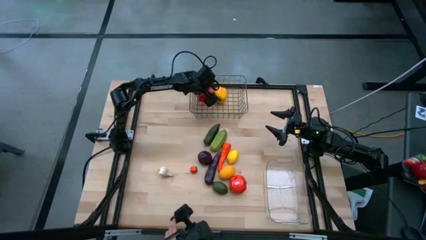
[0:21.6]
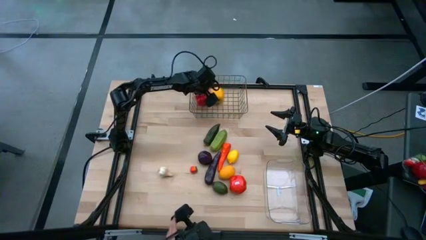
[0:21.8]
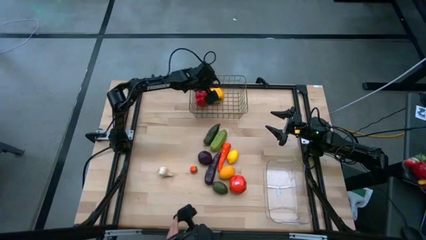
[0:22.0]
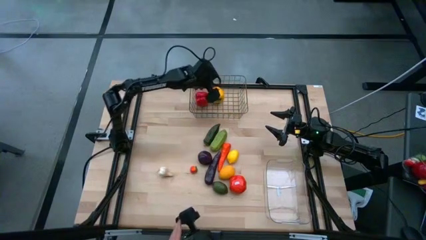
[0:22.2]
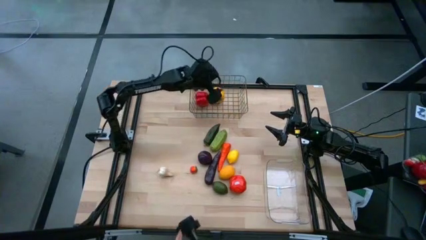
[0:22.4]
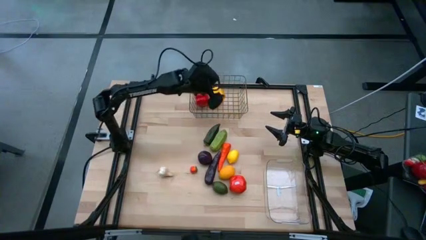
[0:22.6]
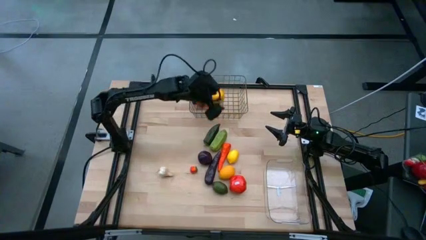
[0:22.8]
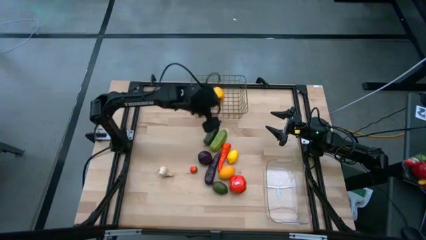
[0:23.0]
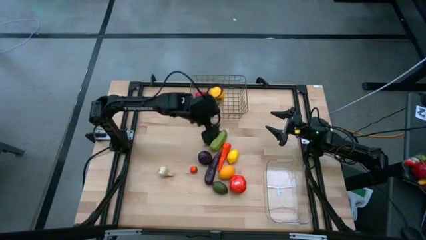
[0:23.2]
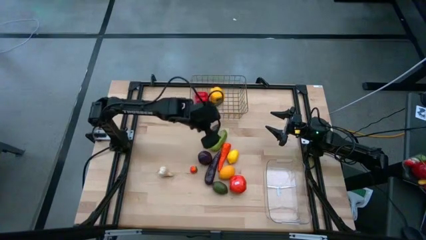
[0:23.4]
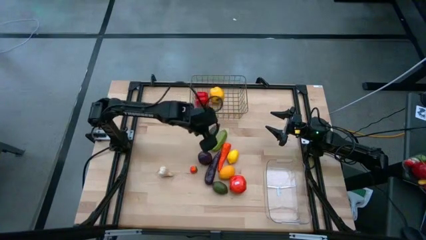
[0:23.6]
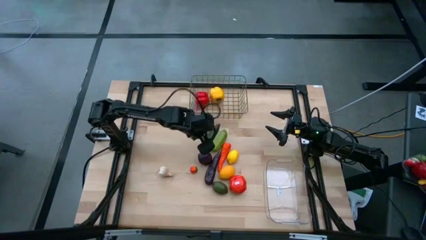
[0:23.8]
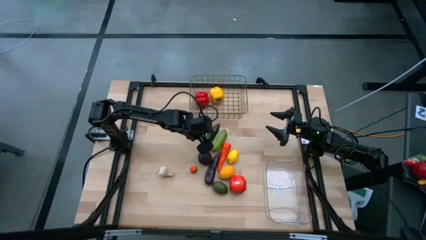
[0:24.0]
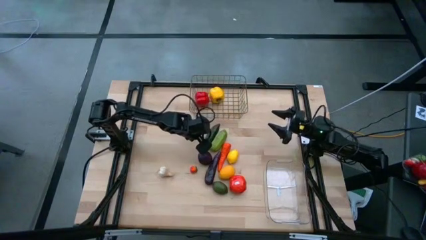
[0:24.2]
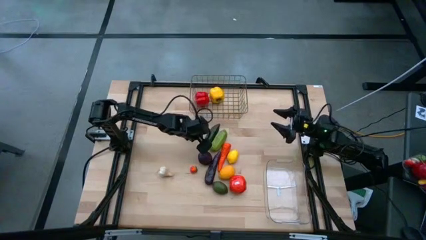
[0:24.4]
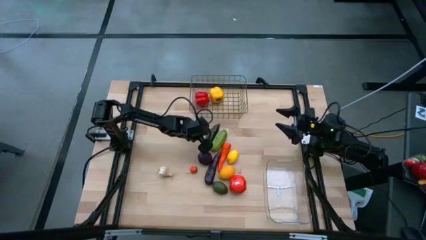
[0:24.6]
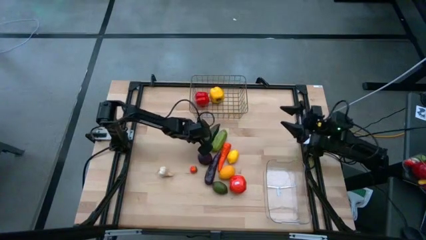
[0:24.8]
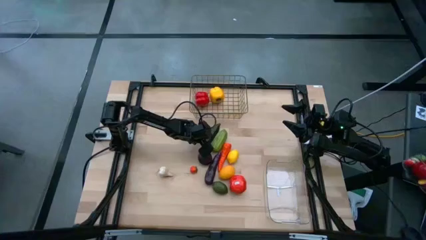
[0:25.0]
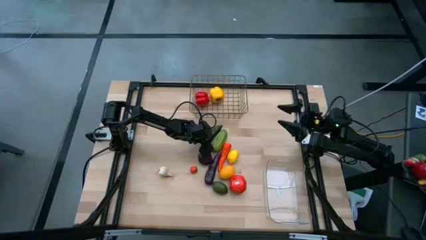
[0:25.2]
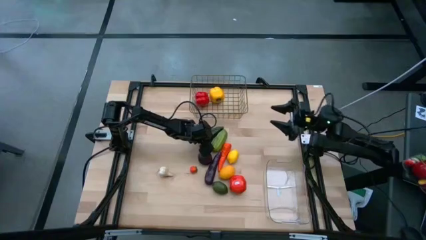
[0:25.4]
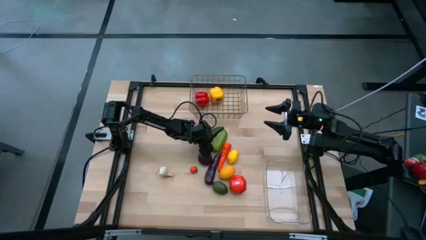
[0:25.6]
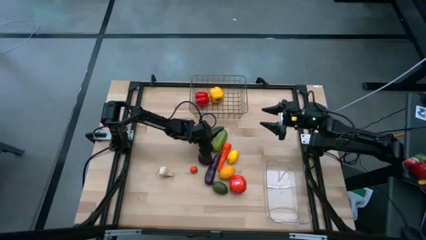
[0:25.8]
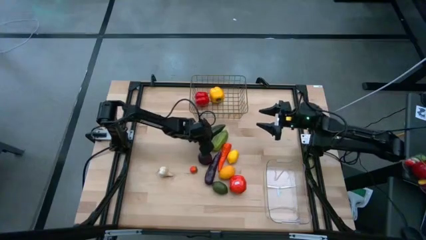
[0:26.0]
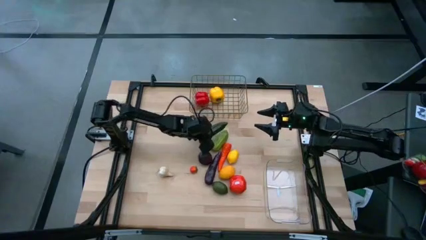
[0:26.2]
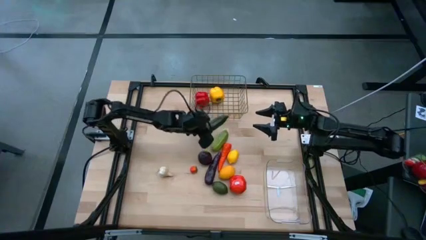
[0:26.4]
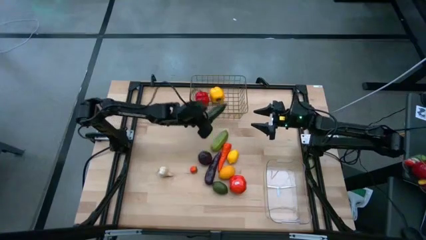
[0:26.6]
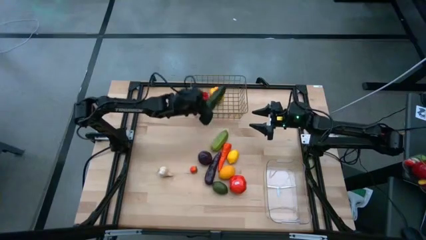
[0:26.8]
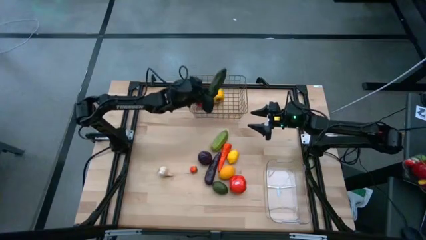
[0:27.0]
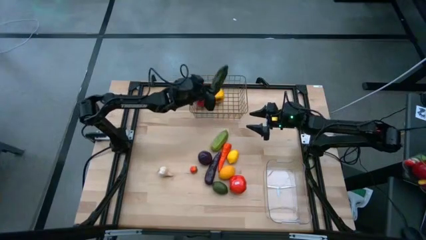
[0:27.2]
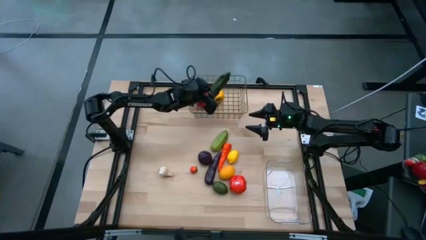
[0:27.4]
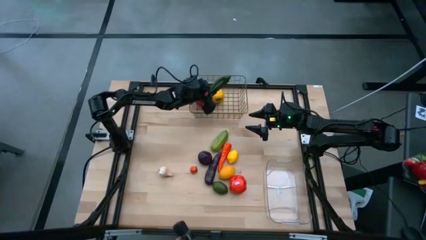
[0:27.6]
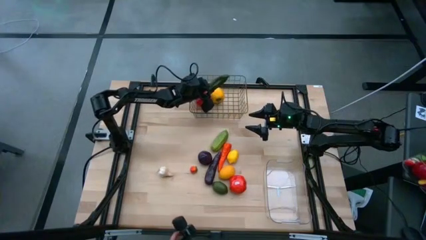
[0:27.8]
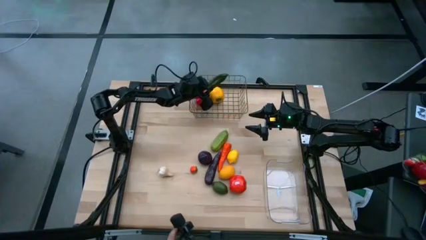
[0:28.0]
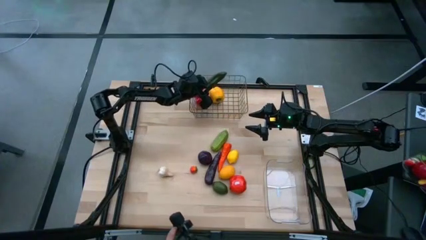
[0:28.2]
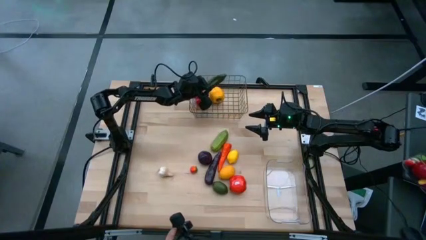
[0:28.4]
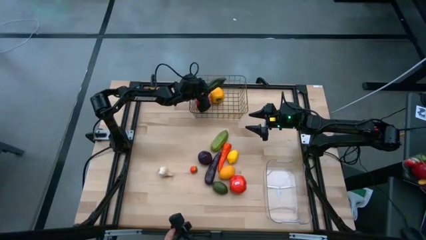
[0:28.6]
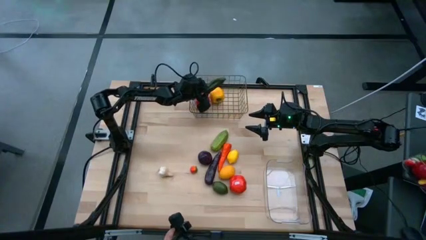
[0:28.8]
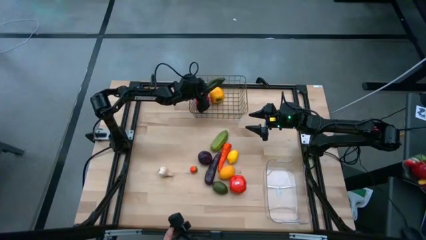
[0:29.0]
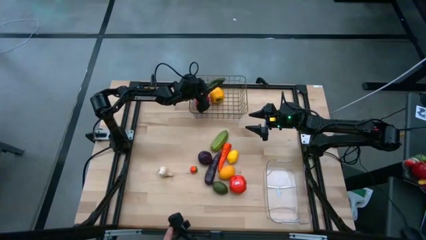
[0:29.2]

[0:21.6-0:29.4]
Task: Sort produce into baskets
Put the green chili pepper into the wire basket

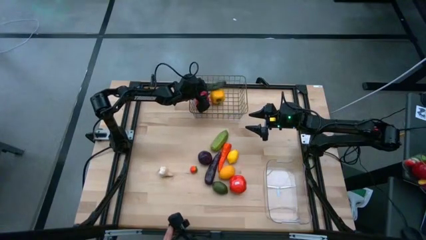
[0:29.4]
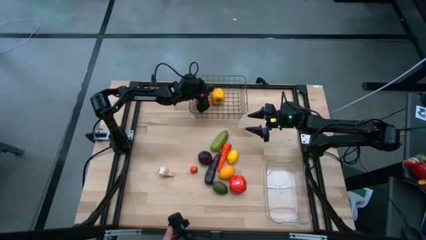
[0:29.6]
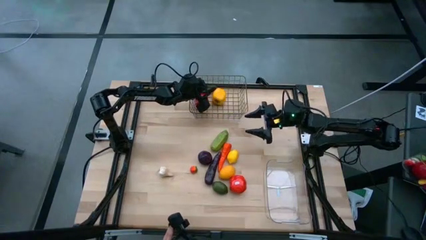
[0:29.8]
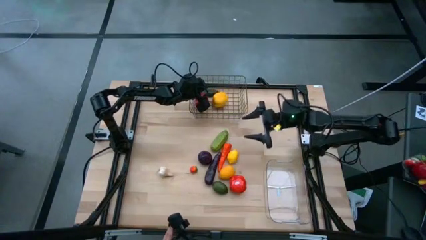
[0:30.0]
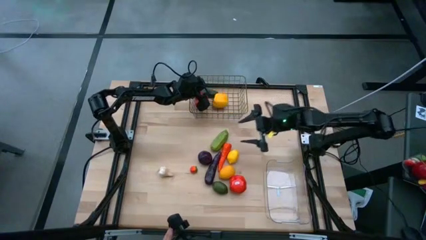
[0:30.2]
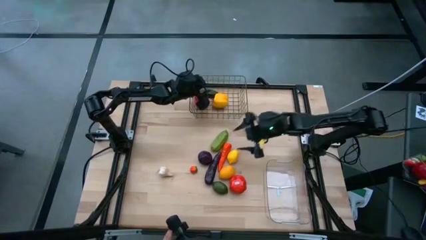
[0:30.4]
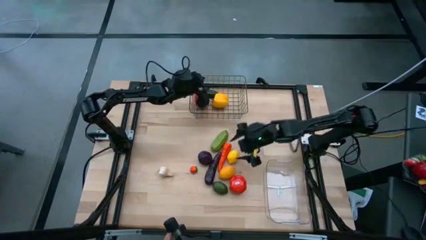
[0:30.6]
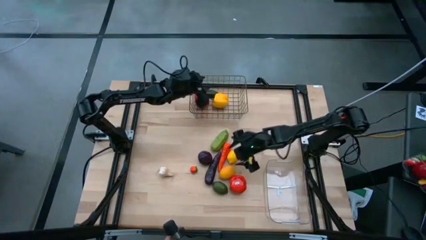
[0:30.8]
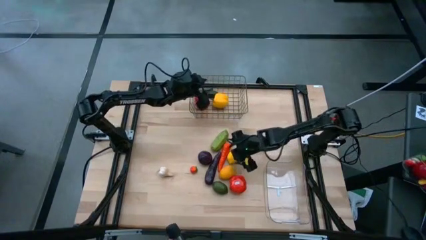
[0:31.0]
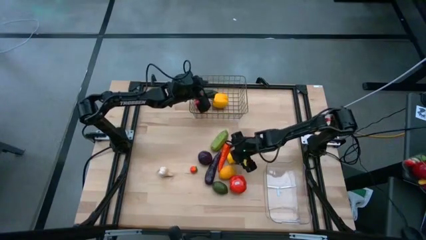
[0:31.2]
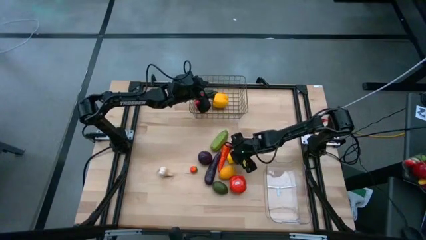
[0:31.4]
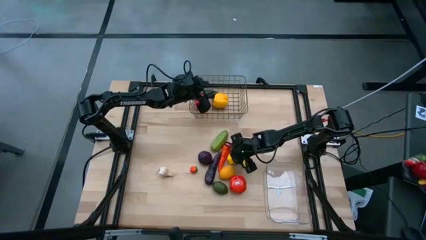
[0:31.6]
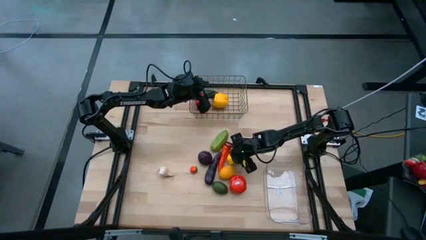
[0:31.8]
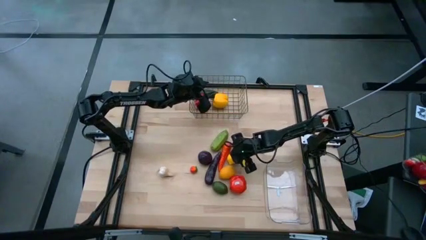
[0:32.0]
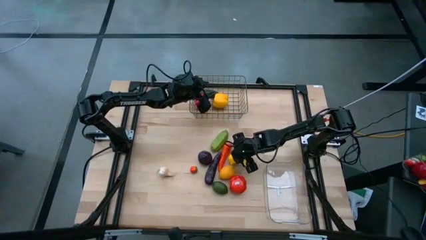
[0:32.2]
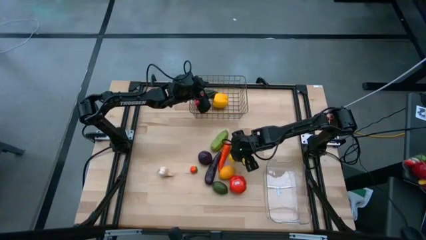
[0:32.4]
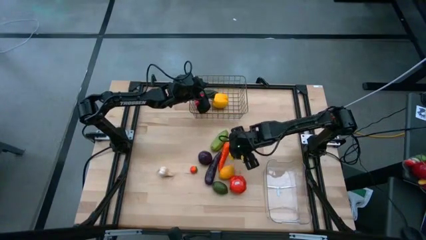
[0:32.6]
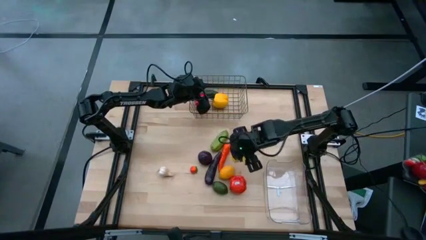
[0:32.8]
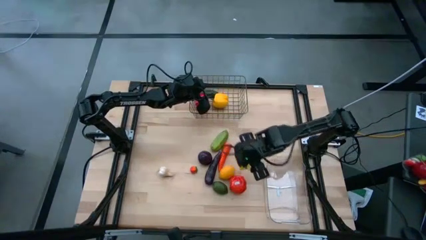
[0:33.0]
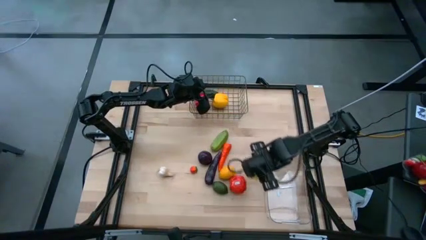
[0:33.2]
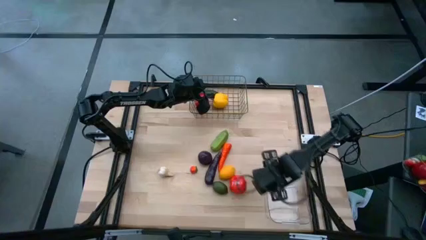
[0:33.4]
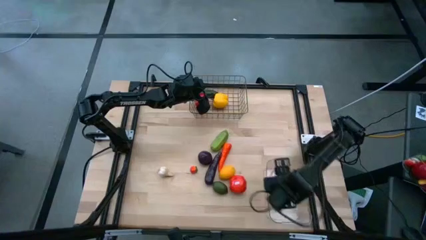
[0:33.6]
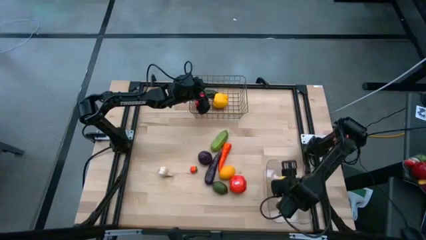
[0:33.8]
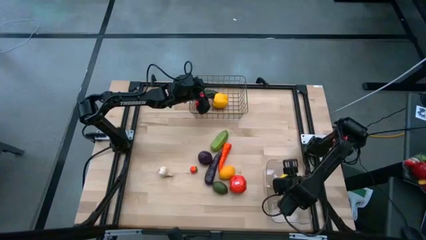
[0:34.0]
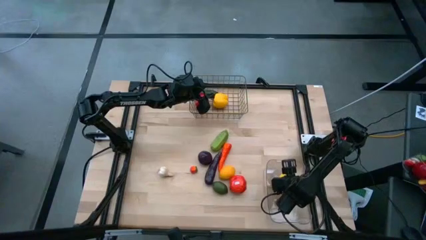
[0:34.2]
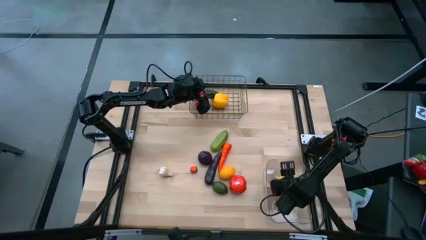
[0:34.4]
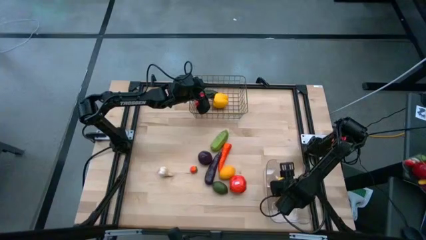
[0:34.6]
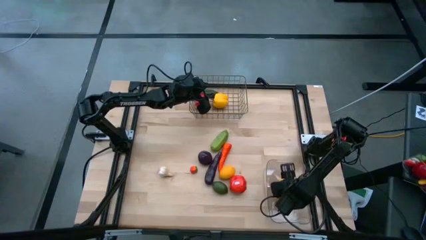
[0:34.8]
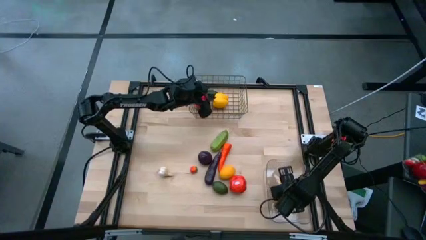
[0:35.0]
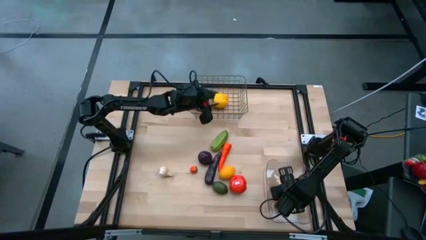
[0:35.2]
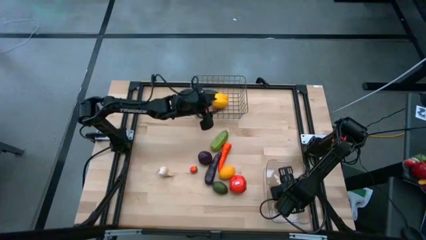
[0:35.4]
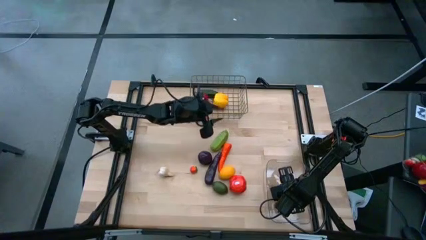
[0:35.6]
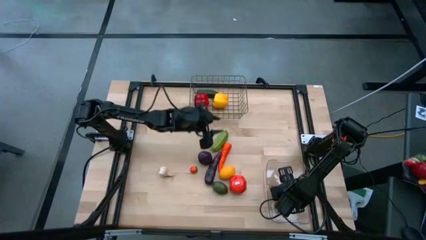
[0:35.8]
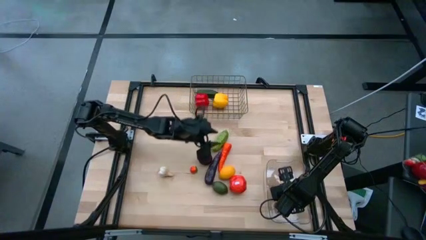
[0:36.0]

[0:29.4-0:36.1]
Put the yellow lemon into the transparent bin

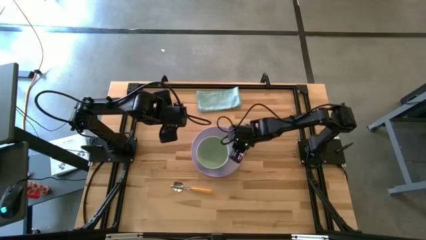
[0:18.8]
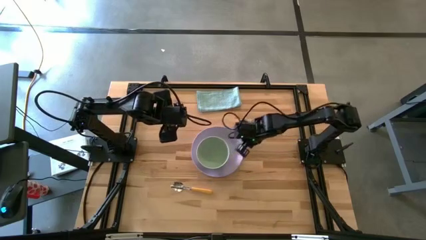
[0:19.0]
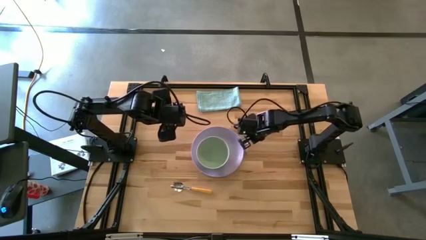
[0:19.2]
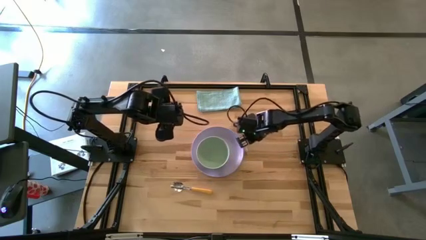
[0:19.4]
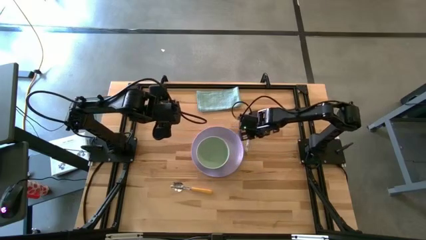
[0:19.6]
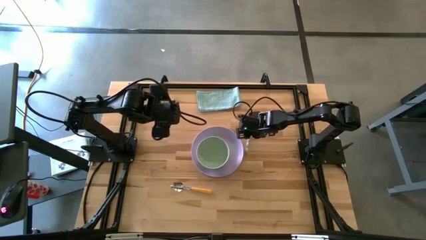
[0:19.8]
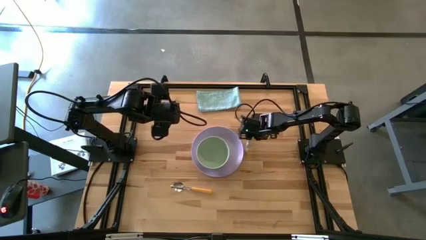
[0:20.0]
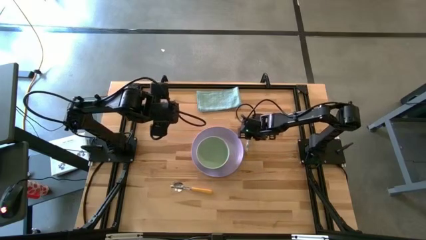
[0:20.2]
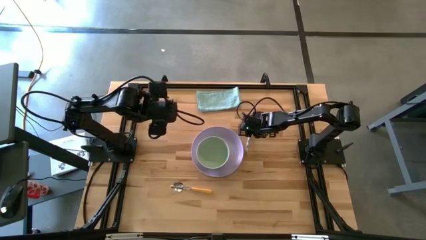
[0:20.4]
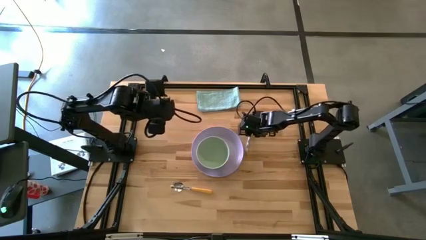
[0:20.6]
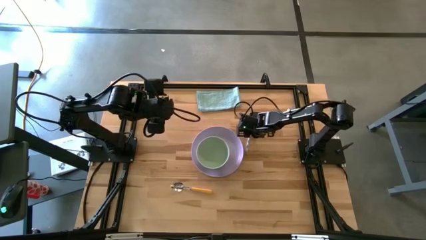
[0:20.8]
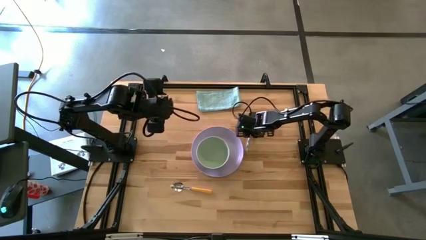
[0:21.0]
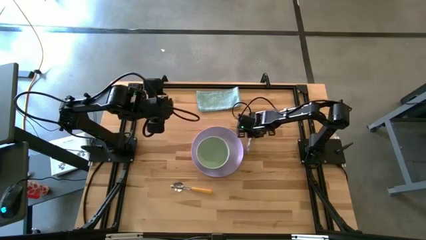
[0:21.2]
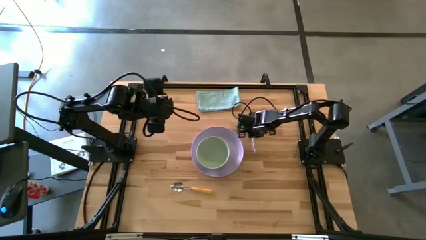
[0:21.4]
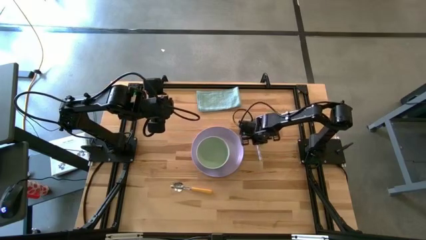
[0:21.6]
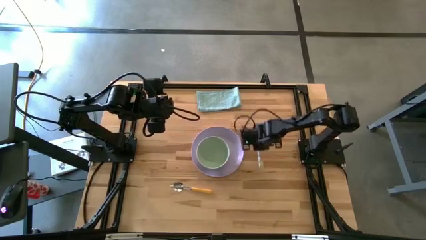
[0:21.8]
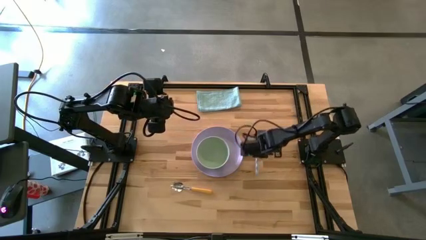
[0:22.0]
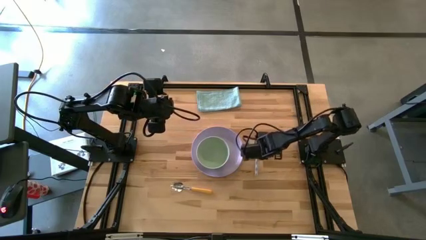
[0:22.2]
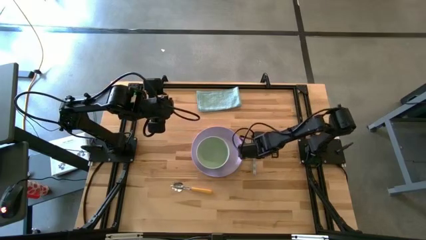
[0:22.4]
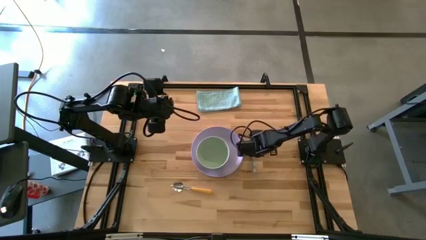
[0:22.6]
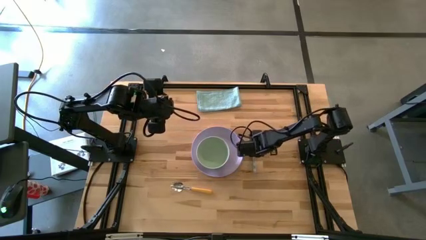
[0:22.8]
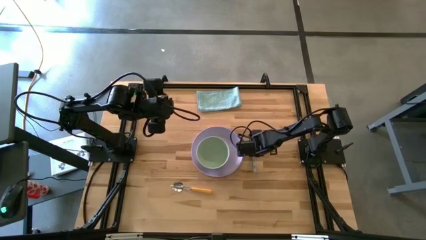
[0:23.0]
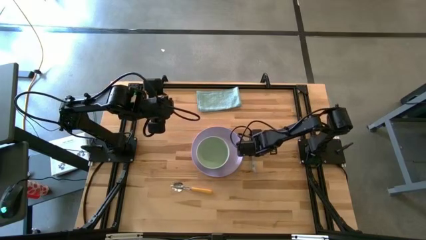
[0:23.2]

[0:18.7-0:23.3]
Task: Set table place
Put the green pattern fork to the right of the purple plate
